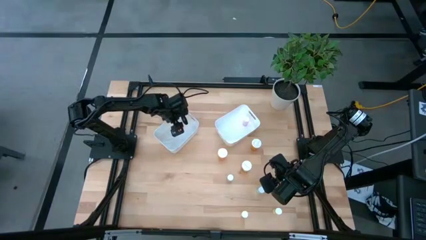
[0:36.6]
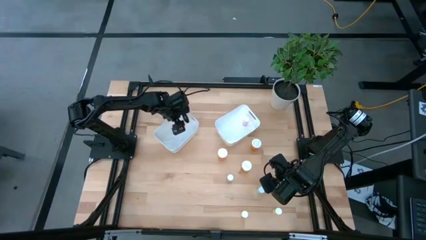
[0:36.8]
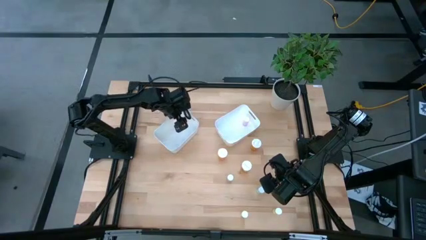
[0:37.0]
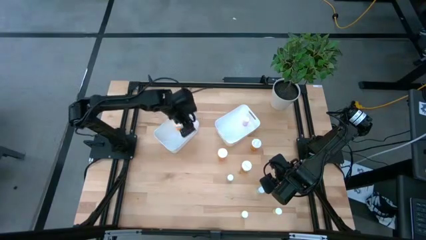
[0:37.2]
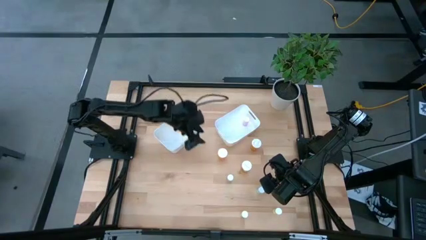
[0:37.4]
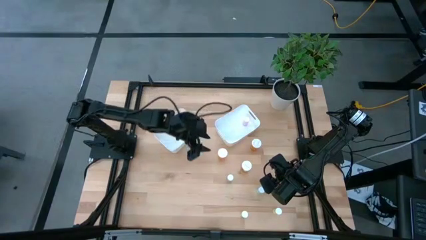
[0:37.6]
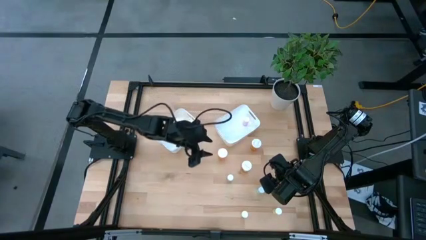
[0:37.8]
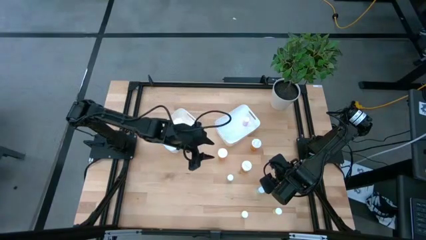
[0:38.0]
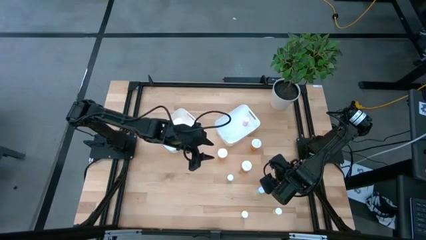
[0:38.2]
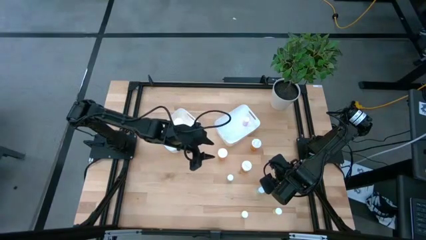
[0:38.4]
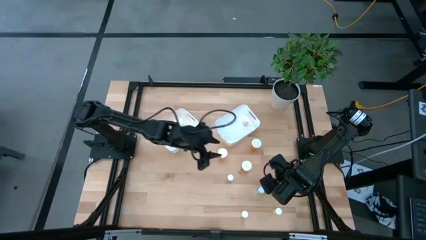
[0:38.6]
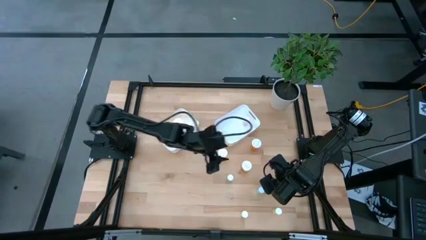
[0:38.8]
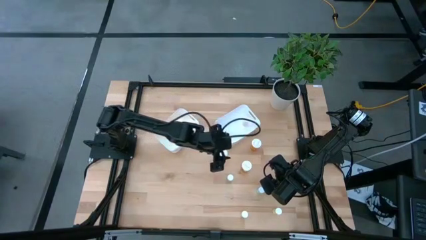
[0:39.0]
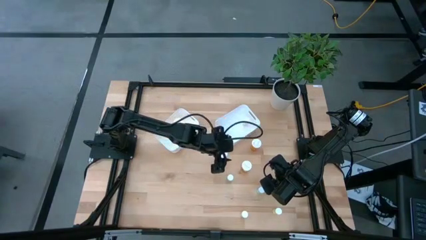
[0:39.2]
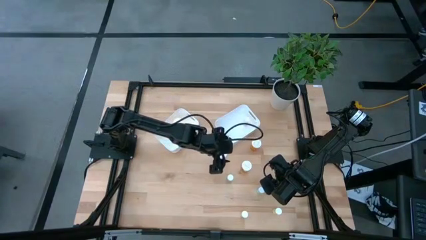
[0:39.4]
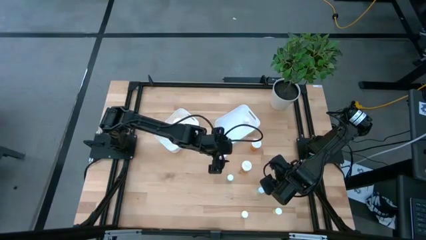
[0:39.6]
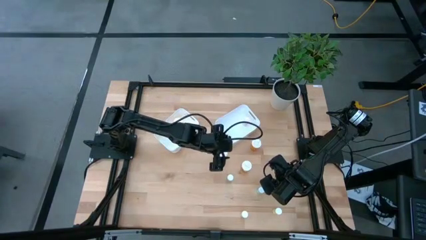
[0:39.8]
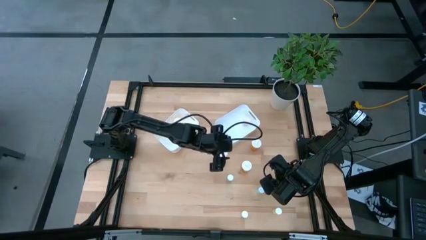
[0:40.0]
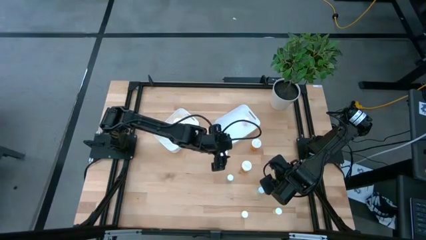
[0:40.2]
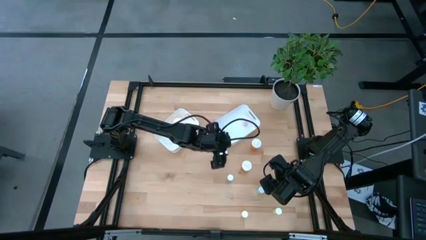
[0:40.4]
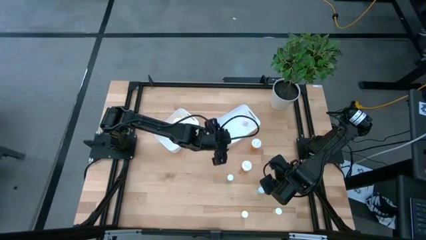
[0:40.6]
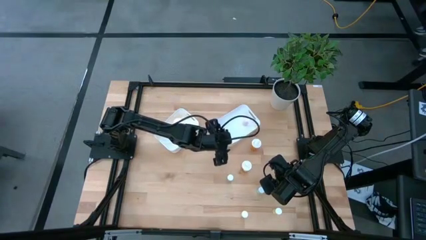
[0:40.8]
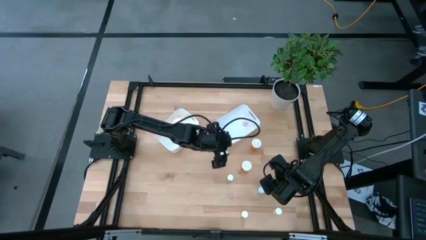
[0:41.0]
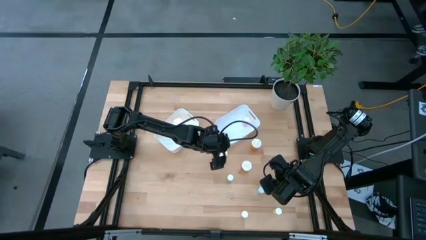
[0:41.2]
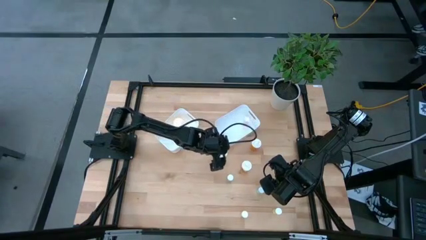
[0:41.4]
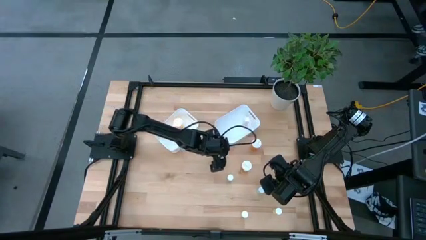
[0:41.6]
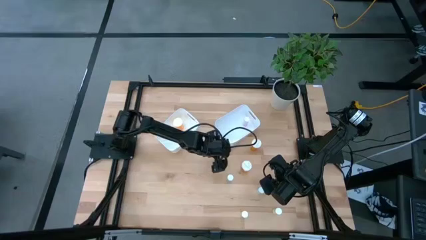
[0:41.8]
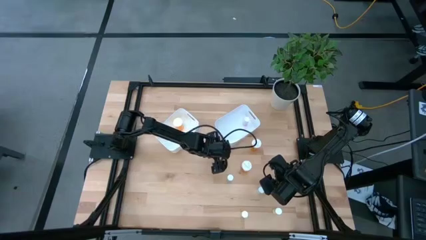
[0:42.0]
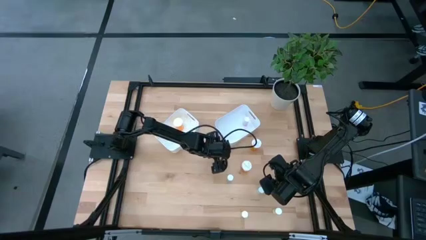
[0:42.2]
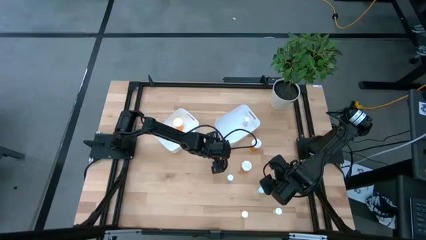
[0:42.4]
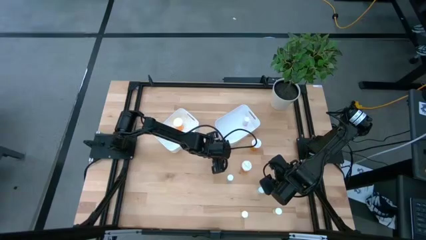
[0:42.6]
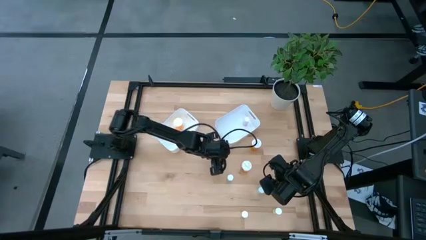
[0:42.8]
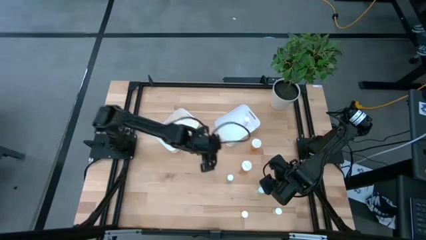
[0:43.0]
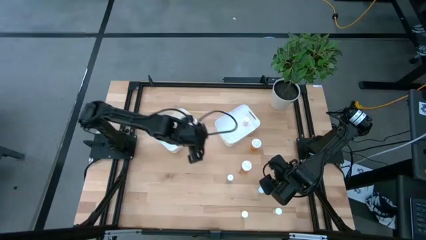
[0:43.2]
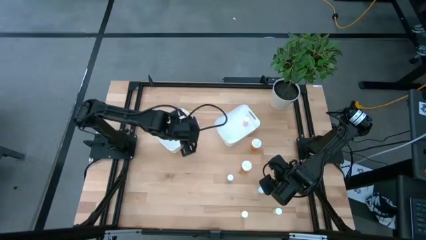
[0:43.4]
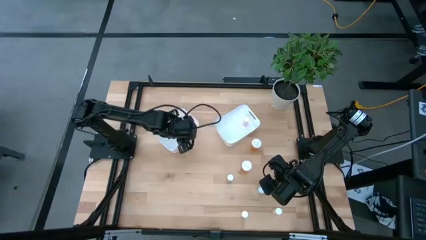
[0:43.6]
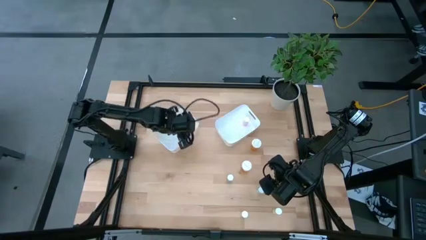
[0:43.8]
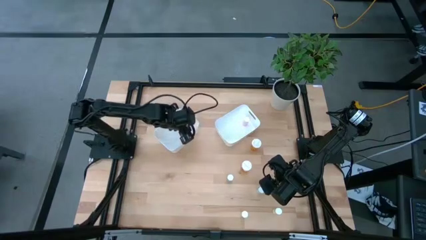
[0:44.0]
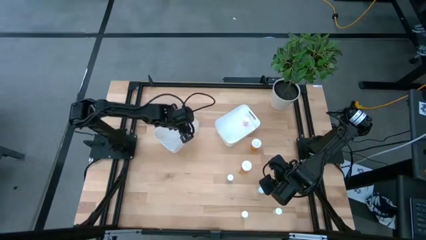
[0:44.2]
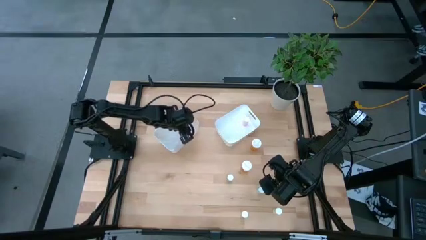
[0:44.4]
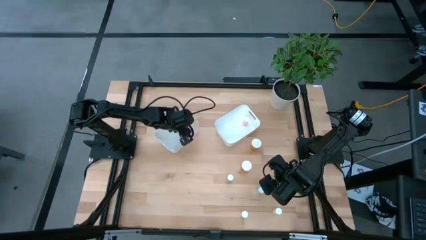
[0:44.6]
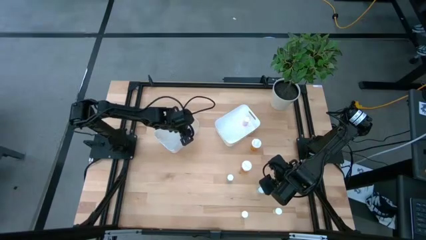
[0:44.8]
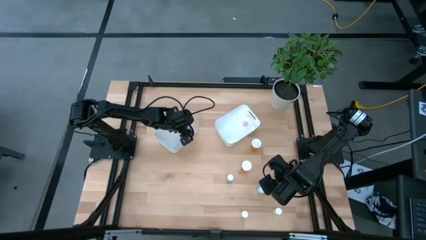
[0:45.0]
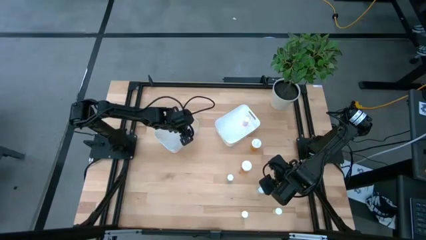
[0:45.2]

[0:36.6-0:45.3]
Task: Pick and place medicine bottles into bin by pill shape (circle, oval)
Put the orange capsule bottle into the left white bin

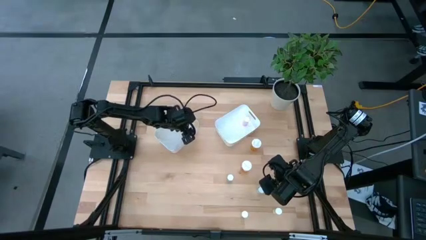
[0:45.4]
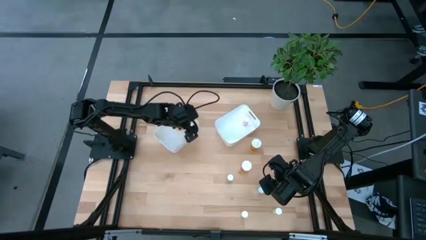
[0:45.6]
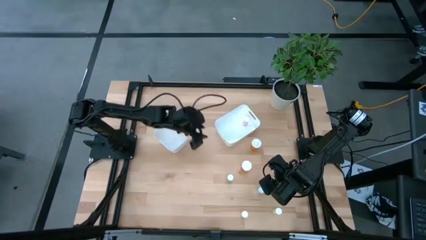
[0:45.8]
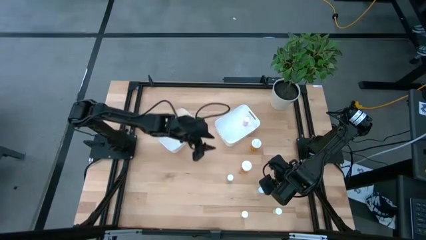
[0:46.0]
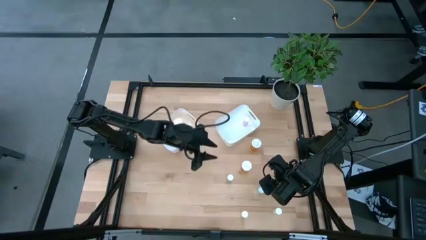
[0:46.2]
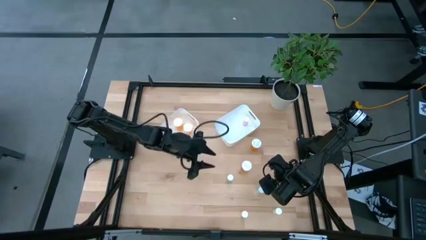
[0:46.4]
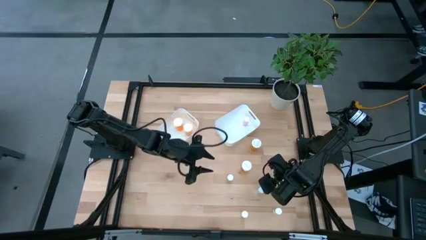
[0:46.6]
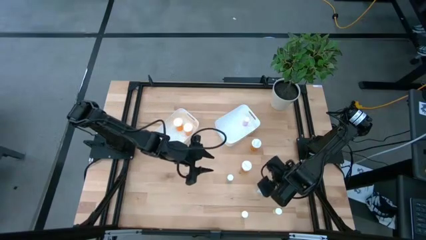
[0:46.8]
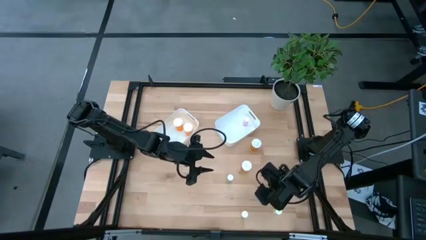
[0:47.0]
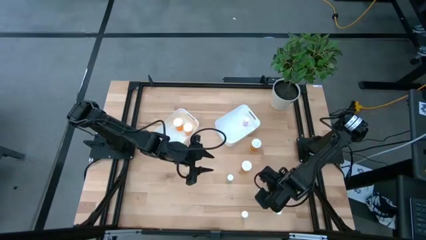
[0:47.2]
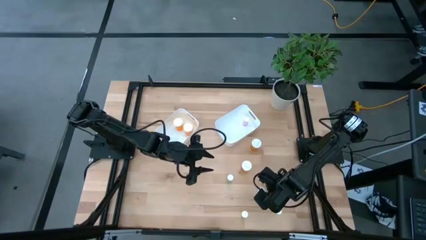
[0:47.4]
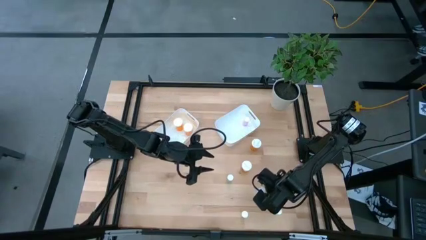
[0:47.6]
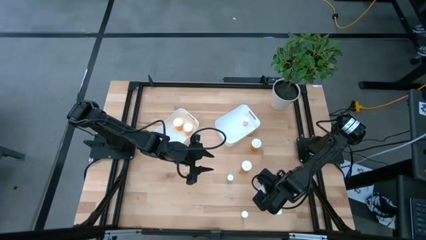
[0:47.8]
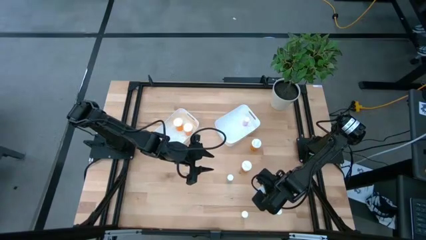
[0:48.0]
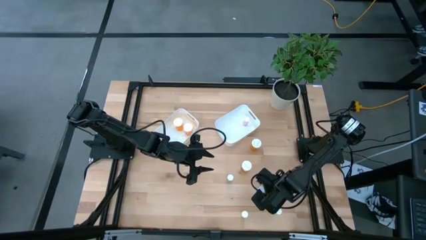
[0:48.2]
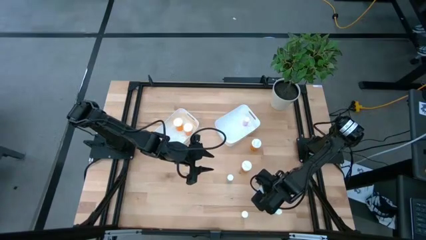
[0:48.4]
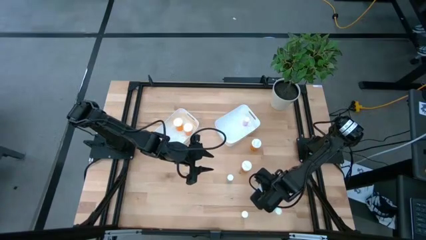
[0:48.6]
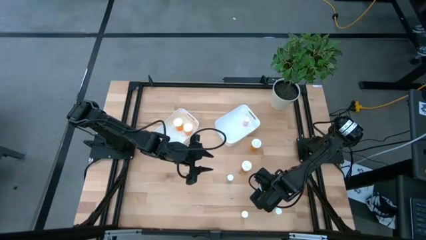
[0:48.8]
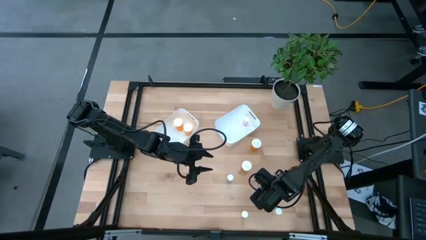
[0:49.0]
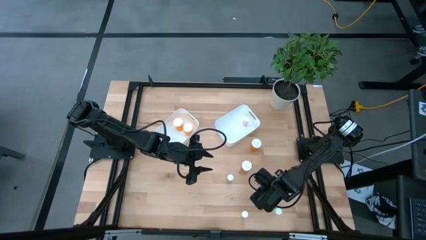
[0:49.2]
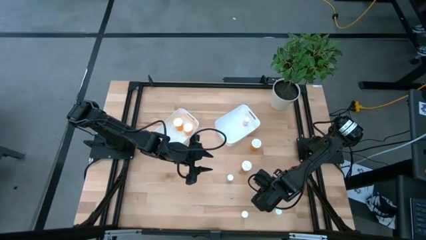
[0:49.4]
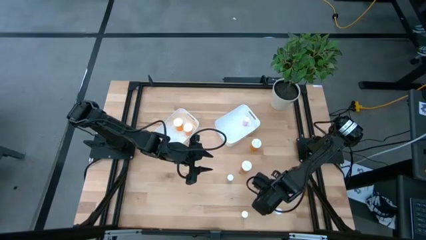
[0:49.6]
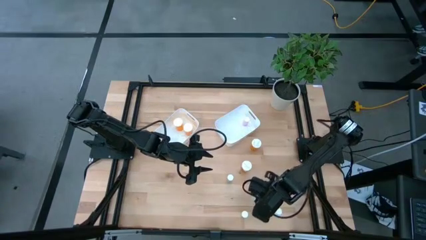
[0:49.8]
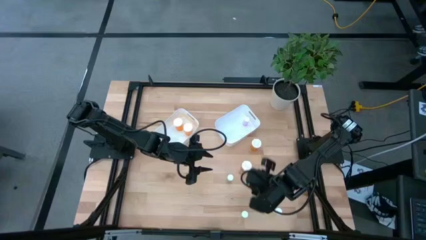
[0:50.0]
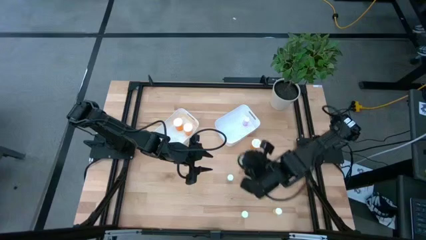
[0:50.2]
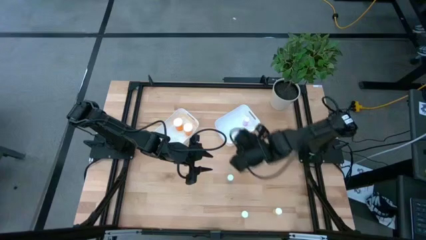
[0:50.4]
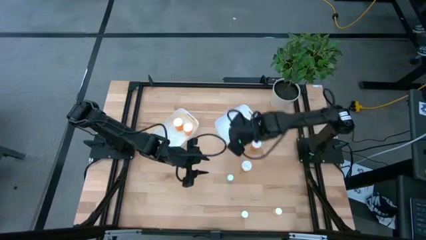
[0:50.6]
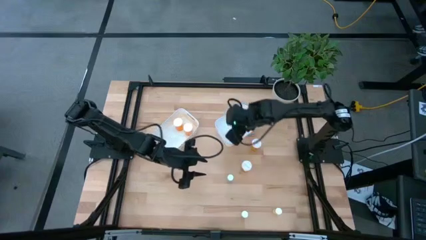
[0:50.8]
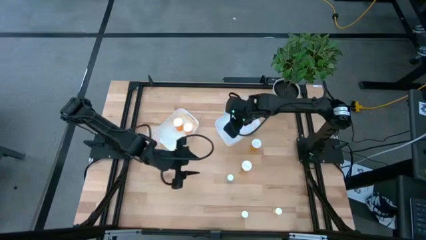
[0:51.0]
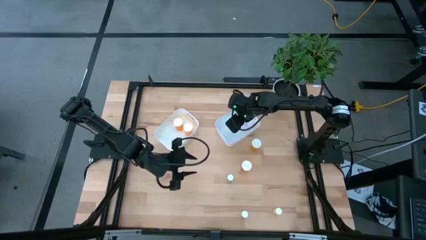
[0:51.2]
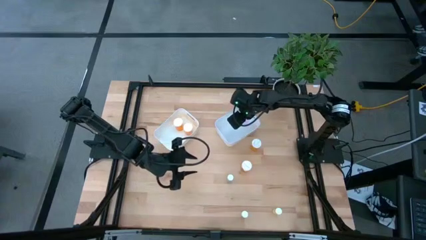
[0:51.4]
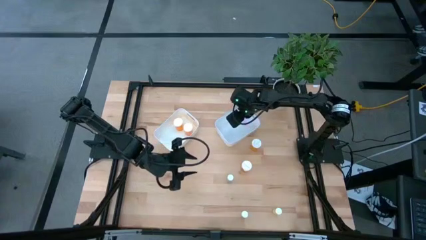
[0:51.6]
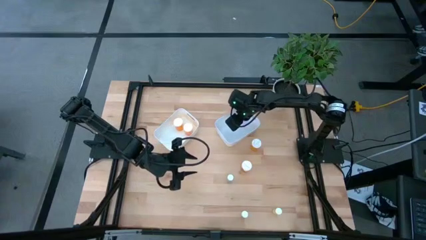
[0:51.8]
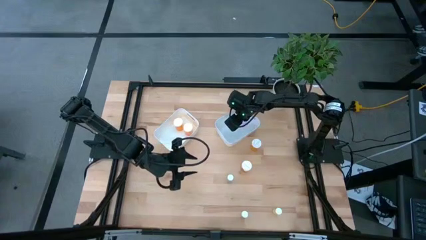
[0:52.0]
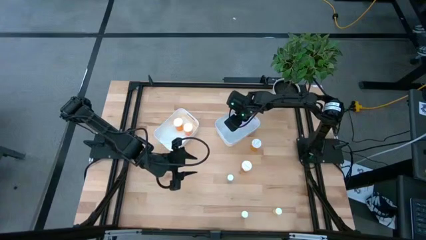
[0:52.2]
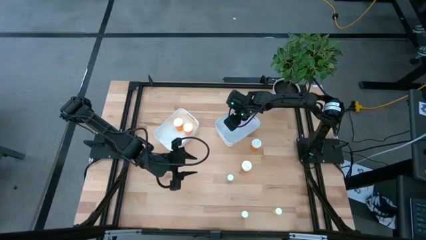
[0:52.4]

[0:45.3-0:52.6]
Put the green tablet bottle into the right white bin
